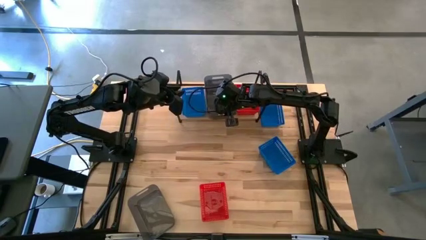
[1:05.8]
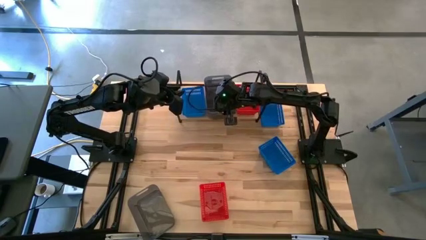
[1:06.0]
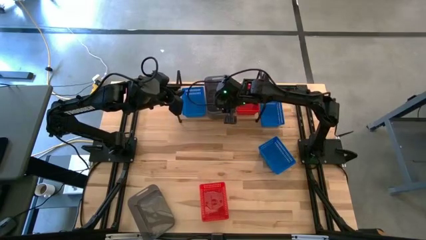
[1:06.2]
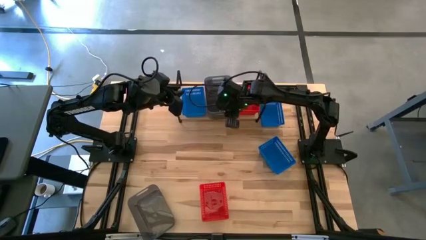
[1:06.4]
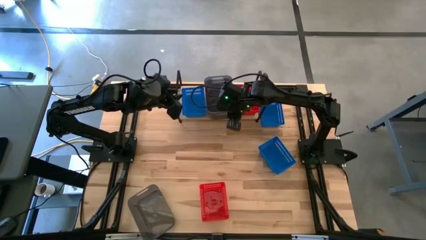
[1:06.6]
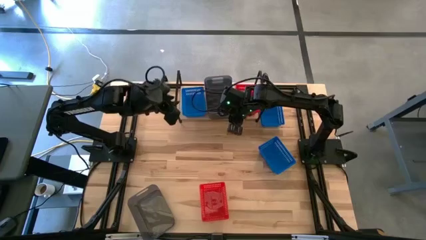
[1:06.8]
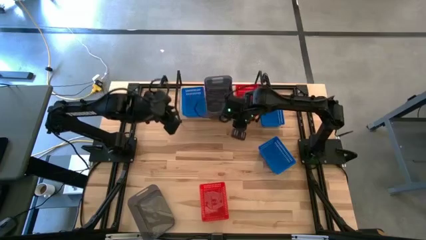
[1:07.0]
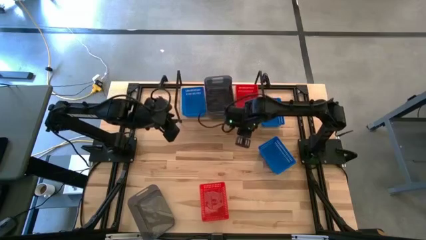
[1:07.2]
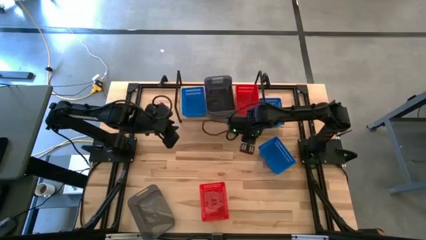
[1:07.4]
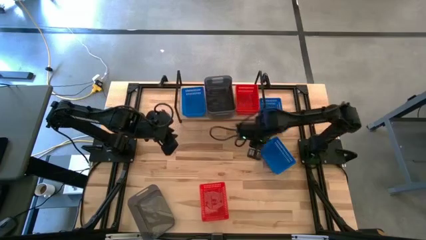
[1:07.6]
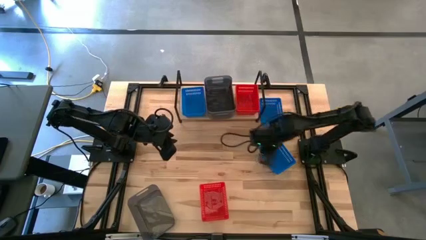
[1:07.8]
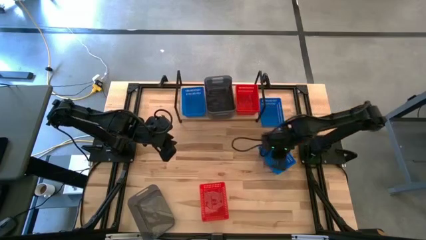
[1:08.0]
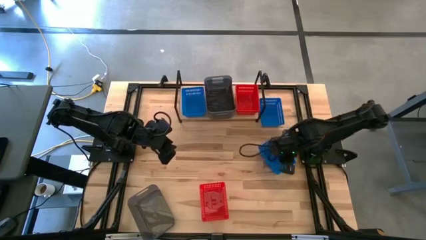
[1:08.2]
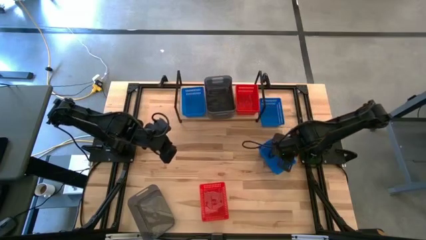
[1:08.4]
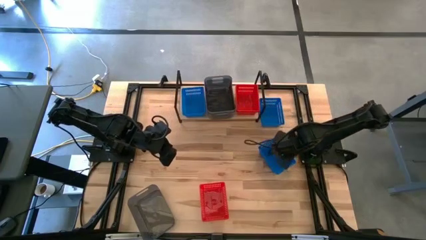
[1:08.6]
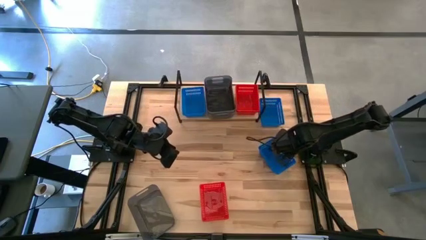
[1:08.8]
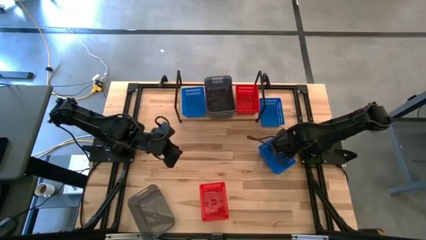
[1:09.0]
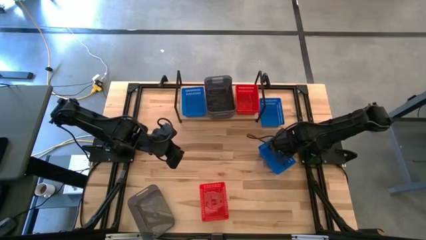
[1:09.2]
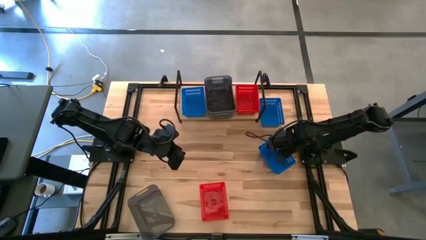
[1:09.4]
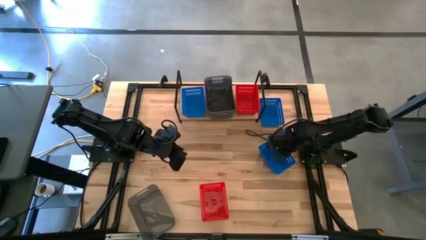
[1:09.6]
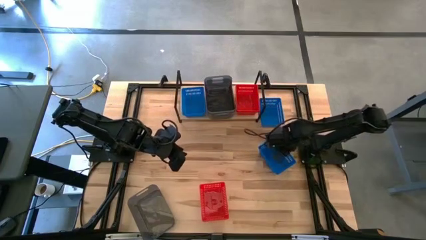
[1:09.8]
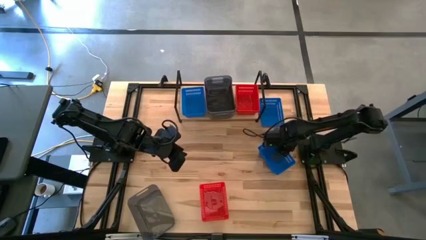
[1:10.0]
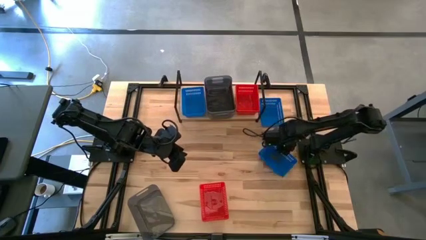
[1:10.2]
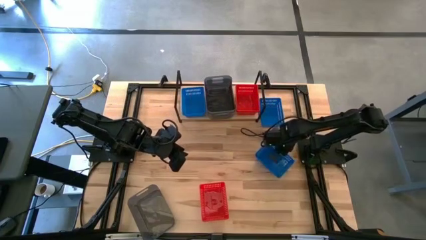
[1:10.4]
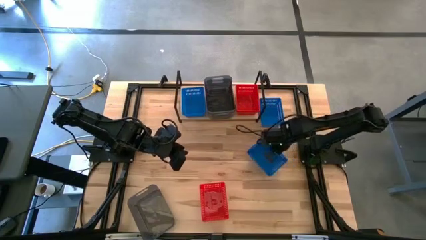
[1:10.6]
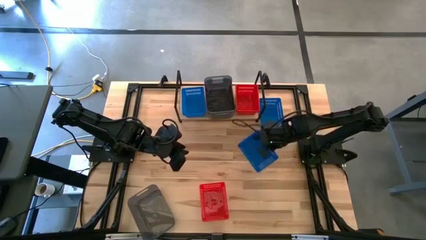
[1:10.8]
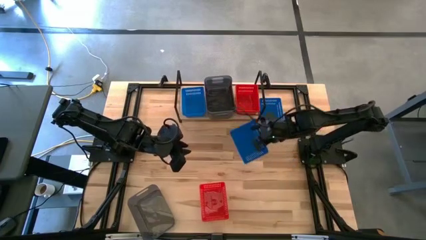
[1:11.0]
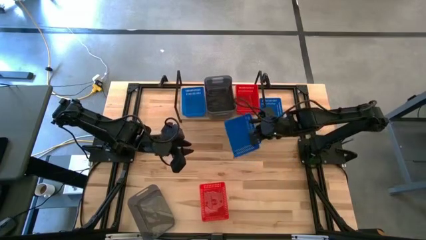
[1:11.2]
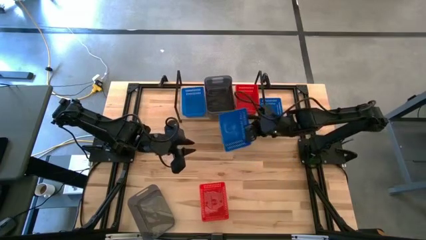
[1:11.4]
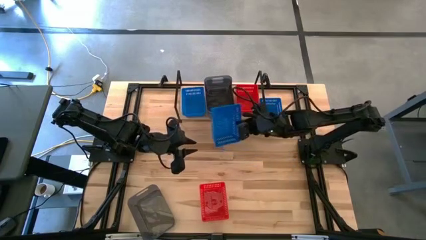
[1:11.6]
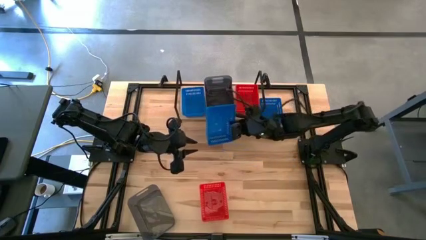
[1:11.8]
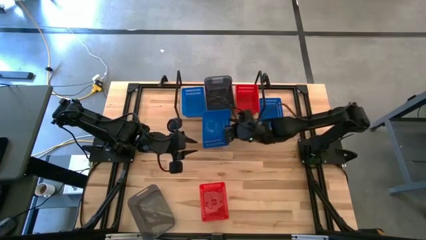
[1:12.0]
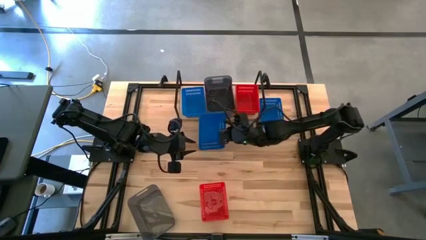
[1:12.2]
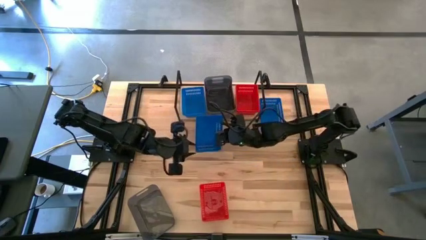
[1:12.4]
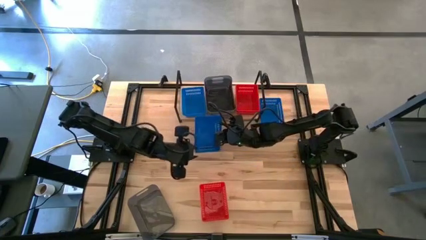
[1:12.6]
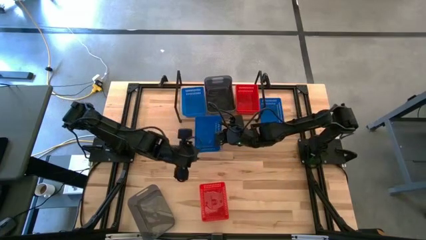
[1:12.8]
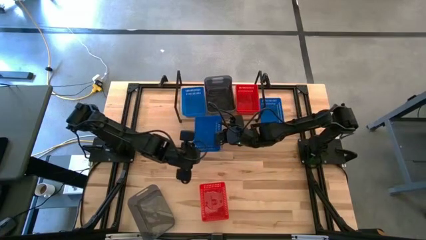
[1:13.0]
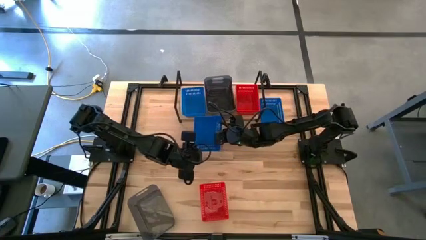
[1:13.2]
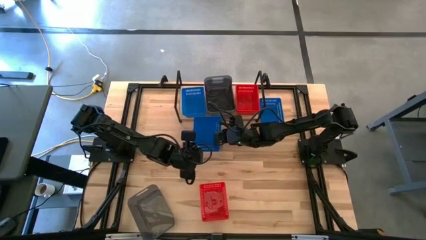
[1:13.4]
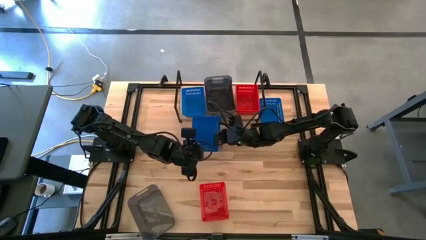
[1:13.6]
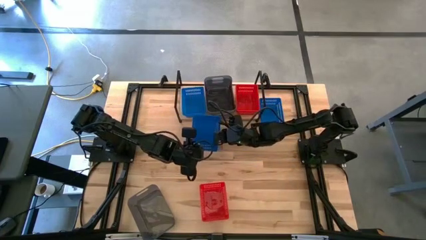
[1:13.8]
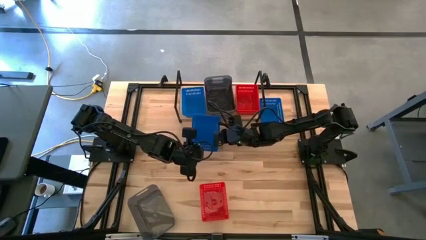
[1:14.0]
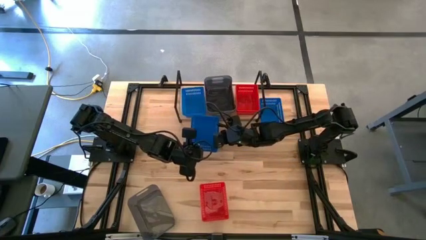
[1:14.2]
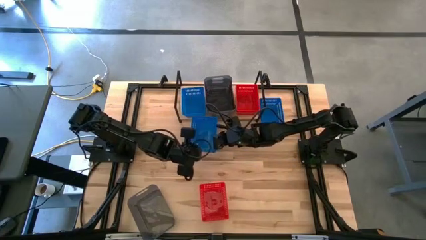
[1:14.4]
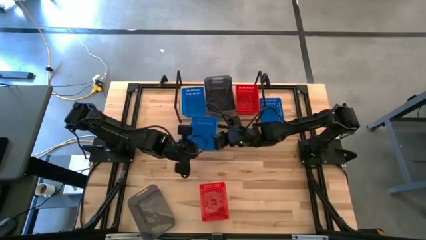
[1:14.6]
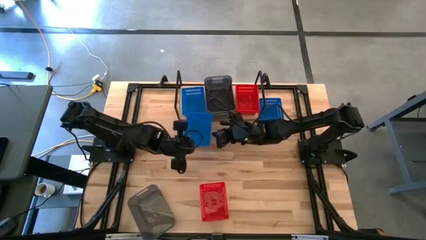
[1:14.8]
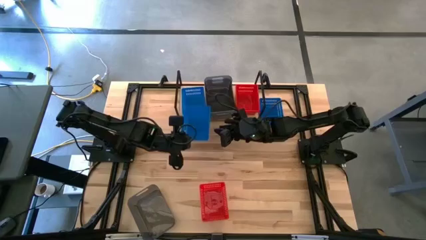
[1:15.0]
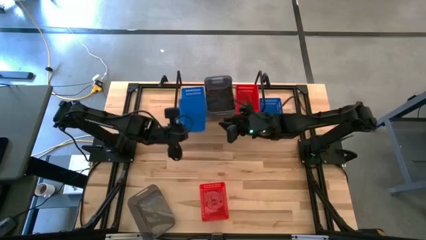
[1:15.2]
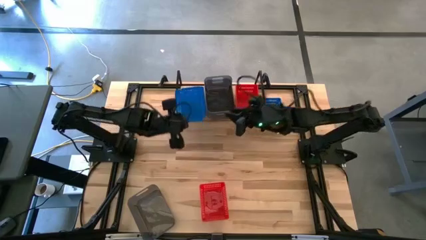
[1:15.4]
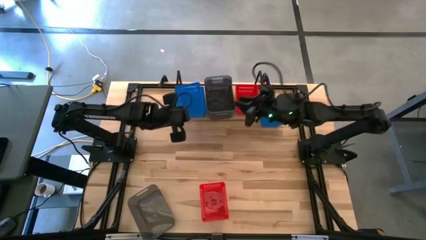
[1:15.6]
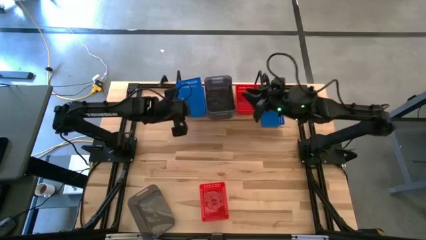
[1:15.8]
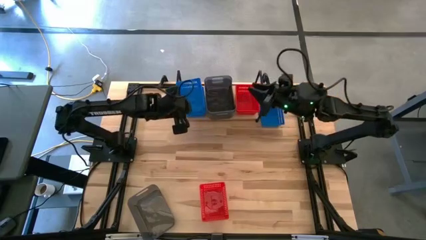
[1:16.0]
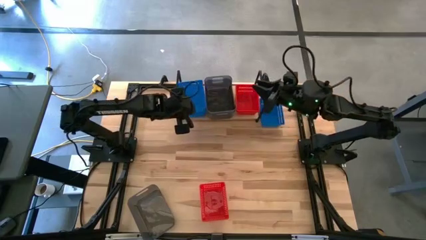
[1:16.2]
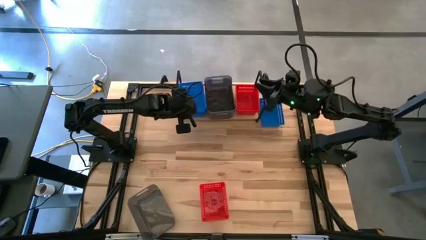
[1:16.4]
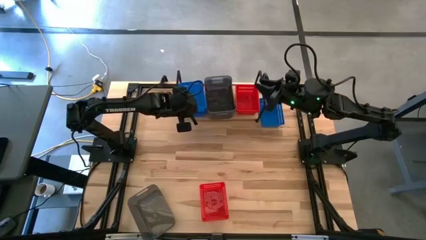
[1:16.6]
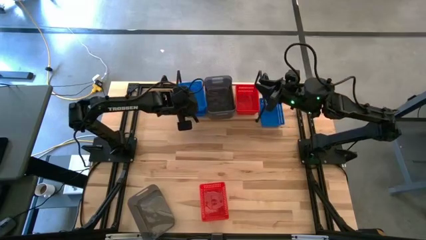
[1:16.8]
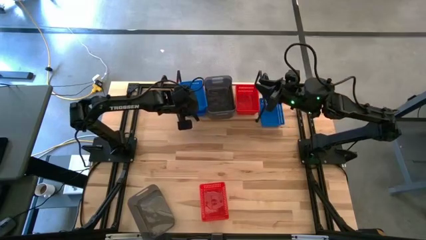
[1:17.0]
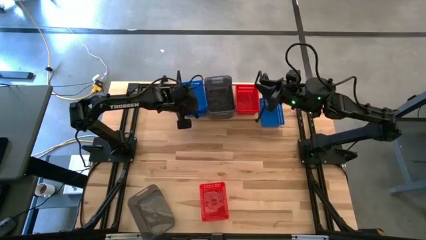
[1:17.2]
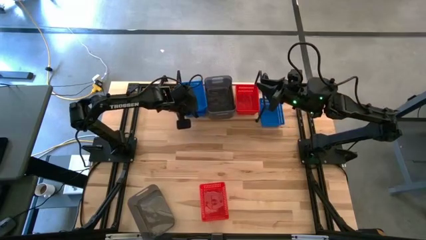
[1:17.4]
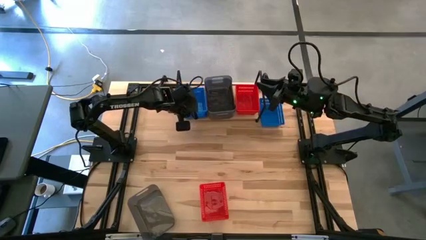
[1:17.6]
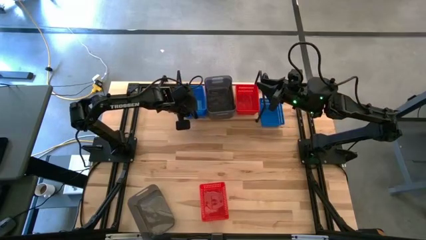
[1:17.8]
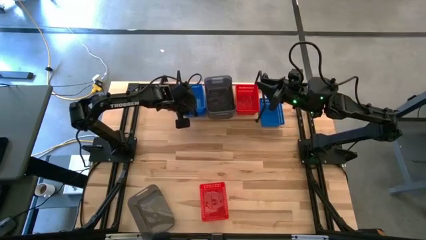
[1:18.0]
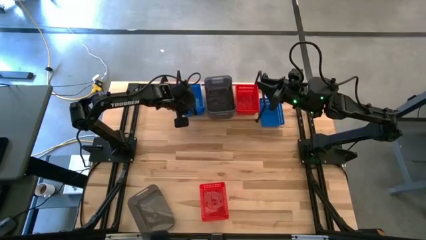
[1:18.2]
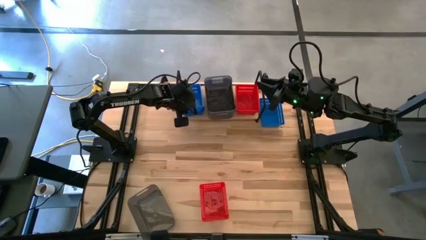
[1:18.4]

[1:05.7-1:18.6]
Task: Stack baskets on shelf by color
Stack the bottom blue bin on the blue bin on the shelf

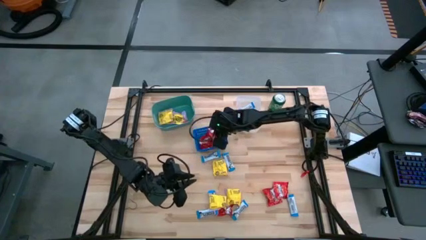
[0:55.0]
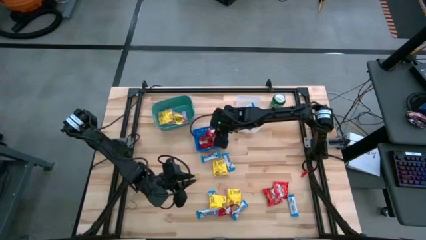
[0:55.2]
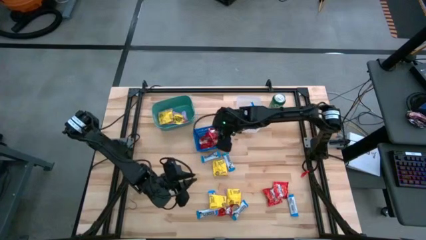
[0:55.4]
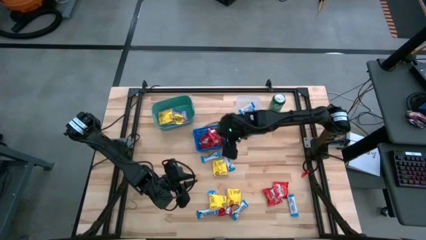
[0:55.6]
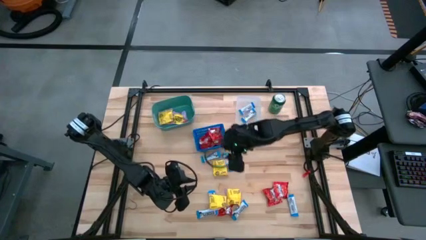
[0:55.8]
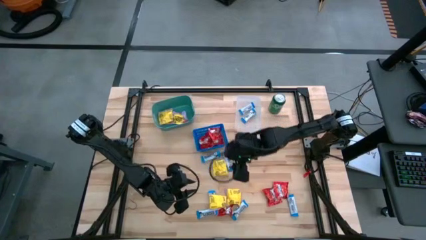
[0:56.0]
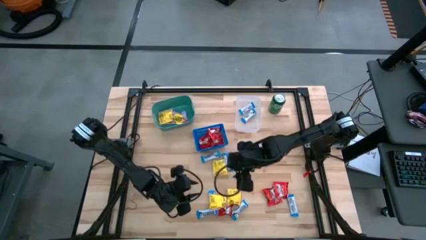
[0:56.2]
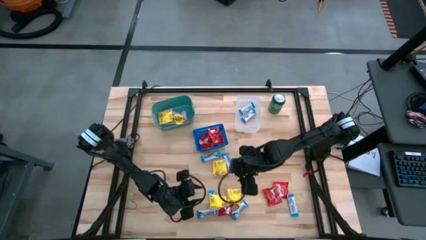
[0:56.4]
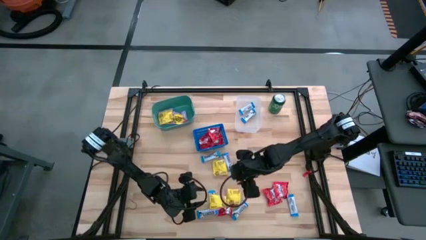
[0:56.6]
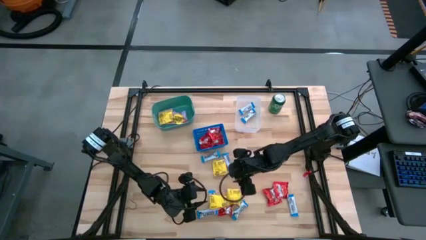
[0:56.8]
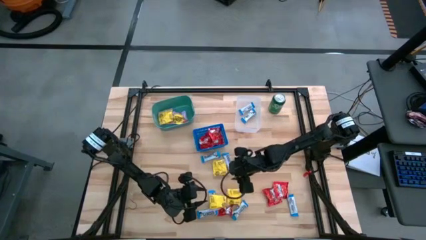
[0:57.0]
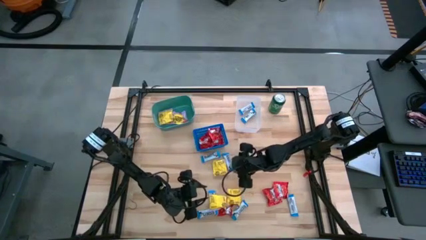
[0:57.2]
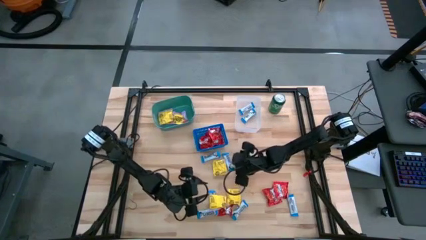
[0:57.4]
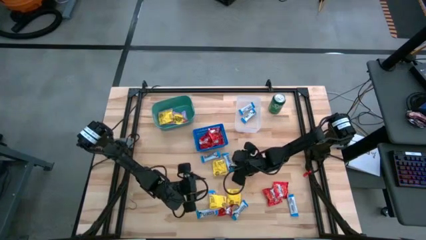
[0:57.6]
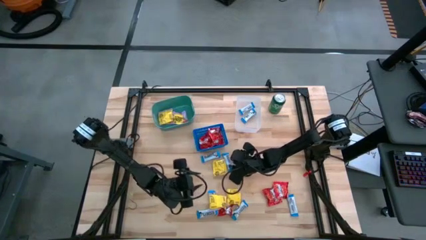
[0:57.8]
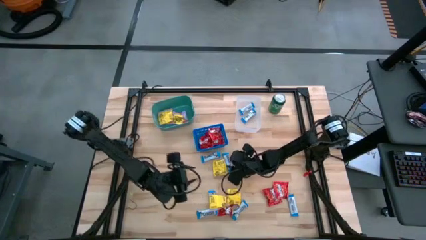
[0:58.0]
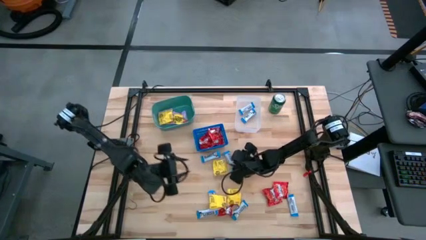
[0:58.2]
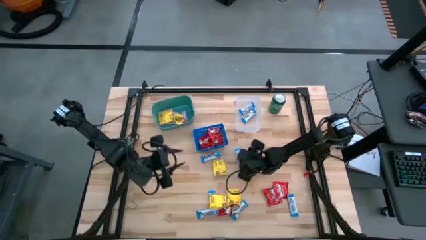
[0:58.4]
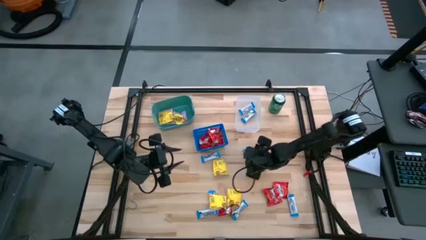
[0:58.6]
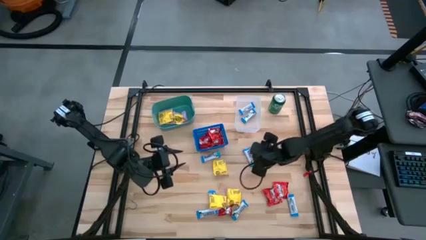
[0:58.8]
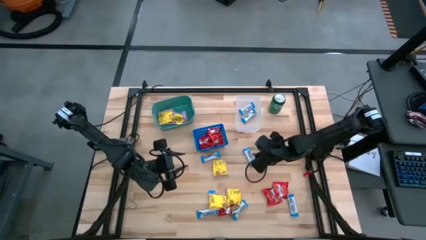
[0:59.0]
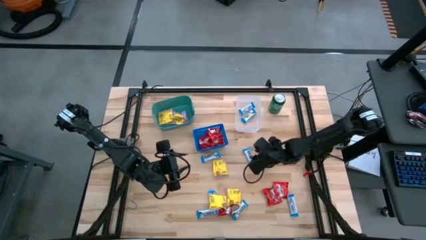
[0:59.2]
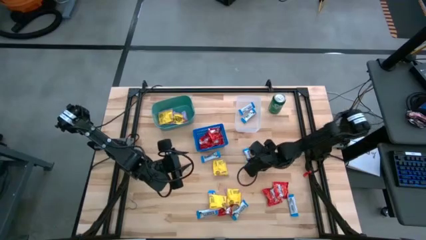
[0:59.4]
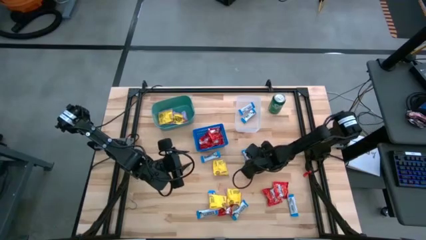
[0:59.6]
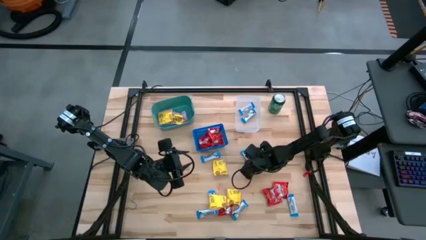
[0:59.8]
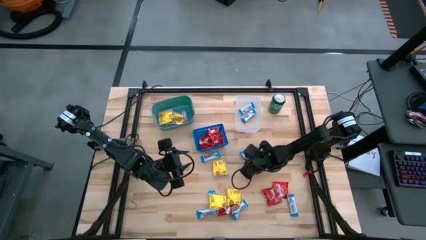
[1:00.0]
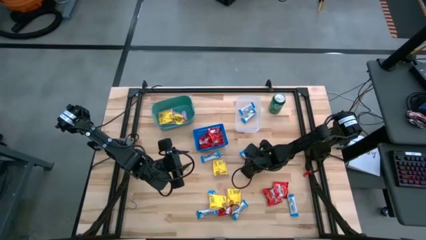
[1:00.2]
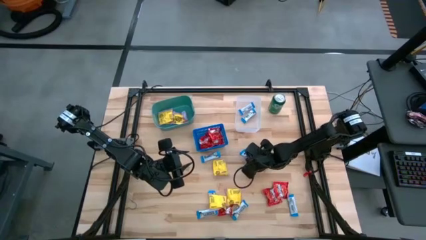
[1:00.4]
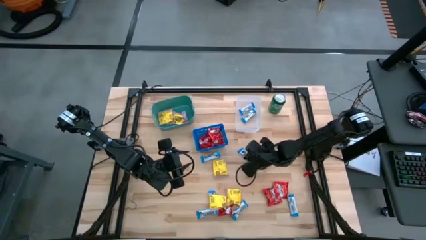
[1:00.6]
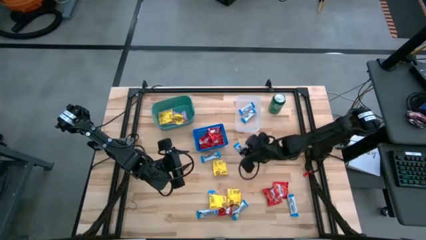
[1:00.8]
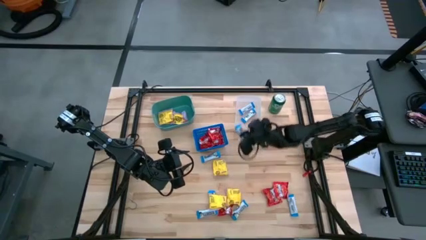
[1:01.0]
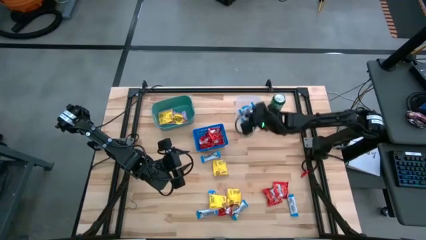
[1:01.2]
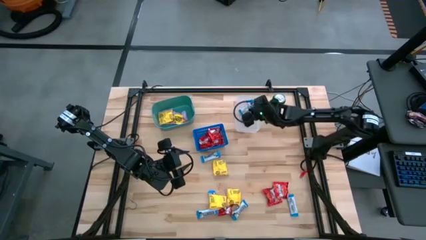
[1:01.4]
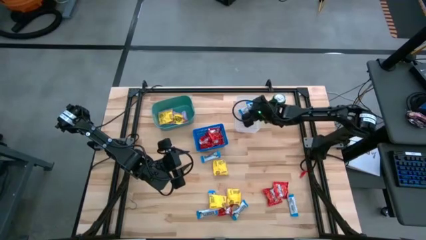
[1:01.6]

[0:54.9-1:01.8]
Task: Sort candy
Put the hersheys bar into the transparent bin
